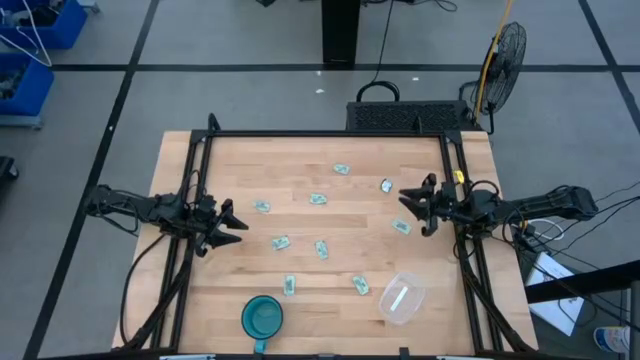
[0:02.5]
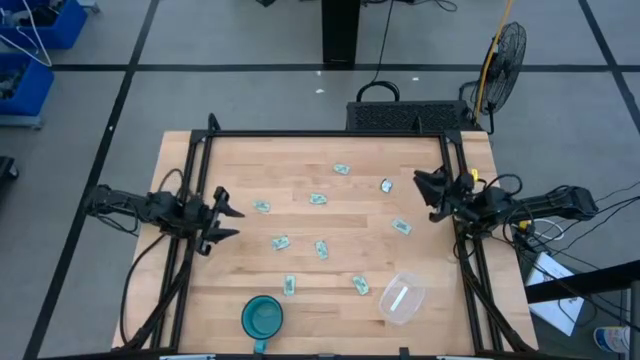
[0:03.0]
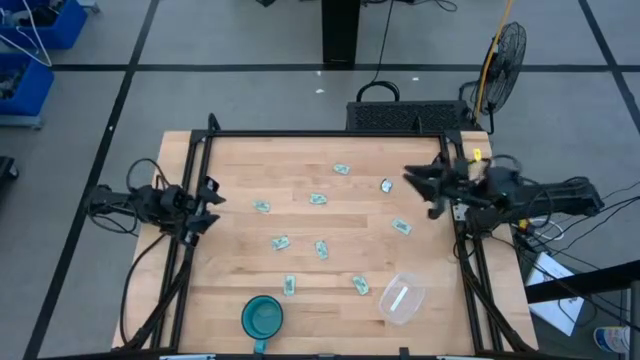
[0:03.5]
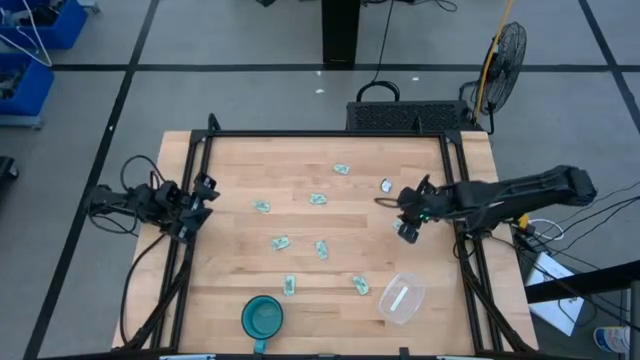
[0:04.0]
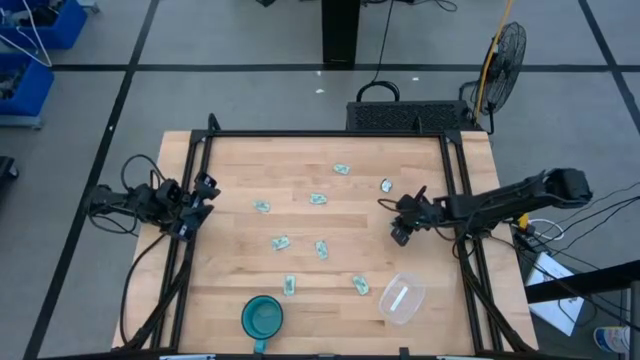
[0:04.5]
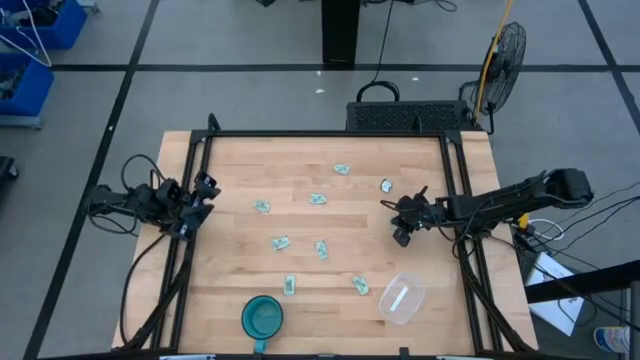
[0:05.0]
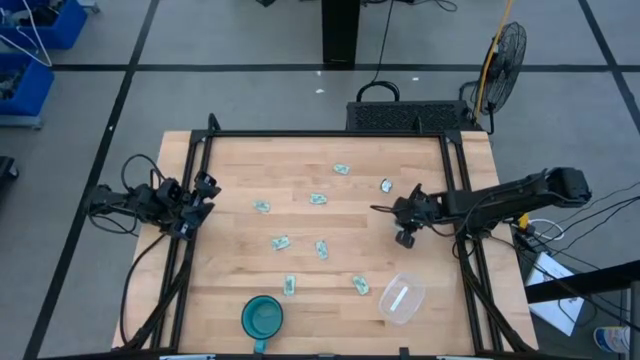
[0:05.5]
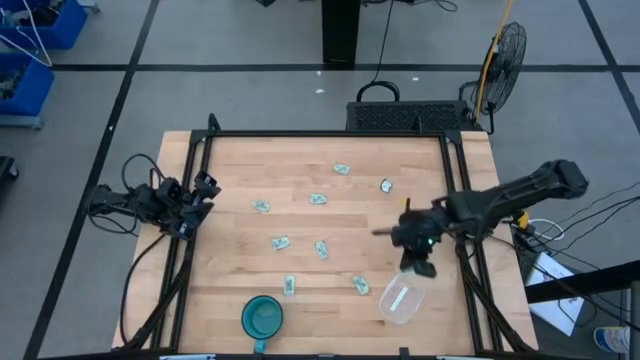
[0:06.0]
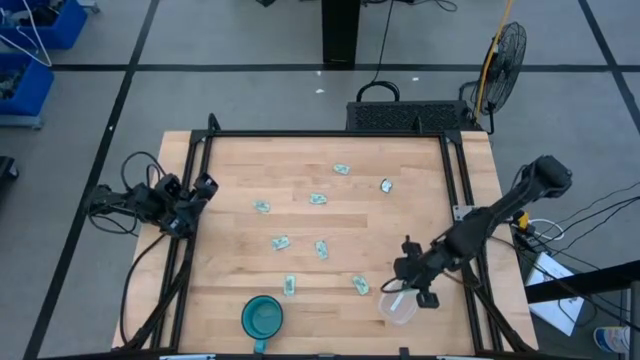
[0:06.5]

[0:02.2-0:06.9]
Task: Pick and place Stevia / Truvia into bins
Put the light green stevia packet into the transparent bin

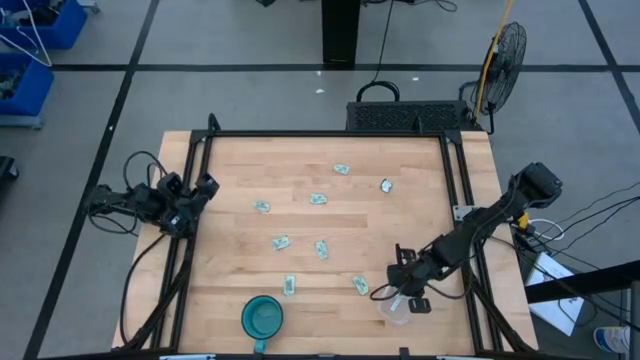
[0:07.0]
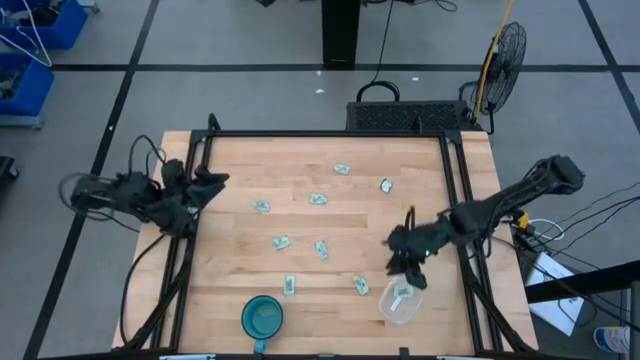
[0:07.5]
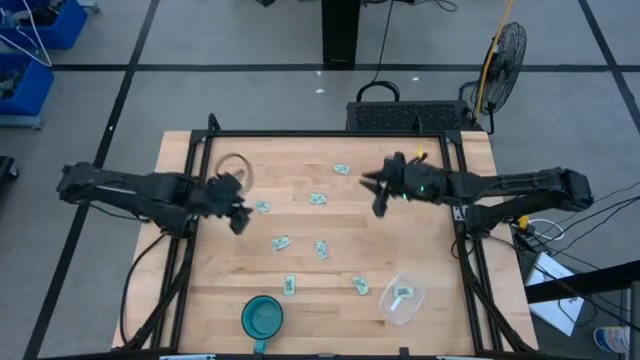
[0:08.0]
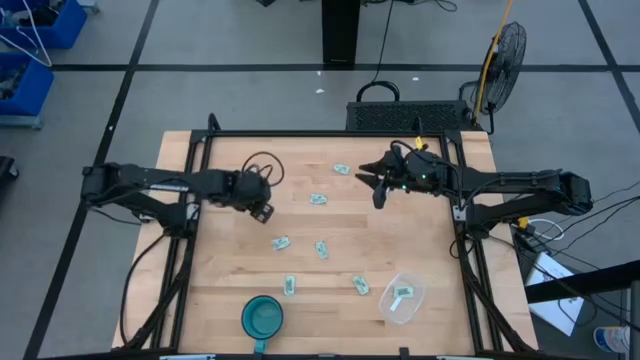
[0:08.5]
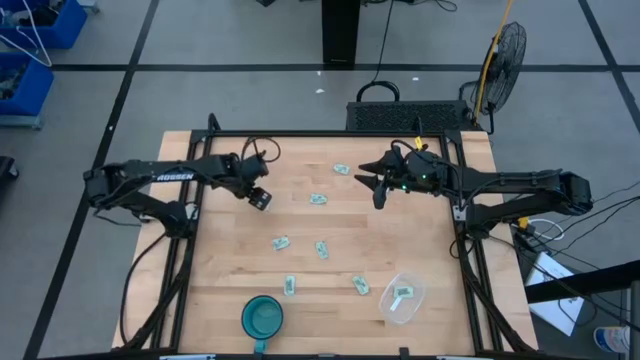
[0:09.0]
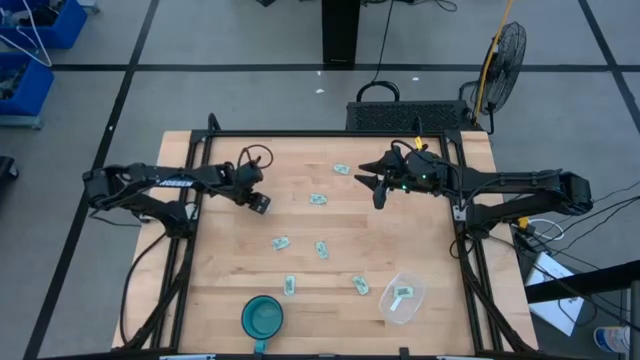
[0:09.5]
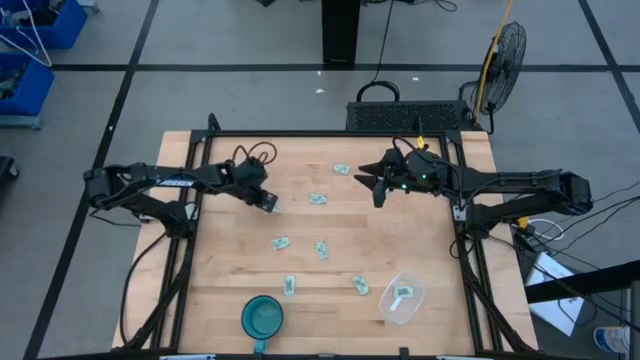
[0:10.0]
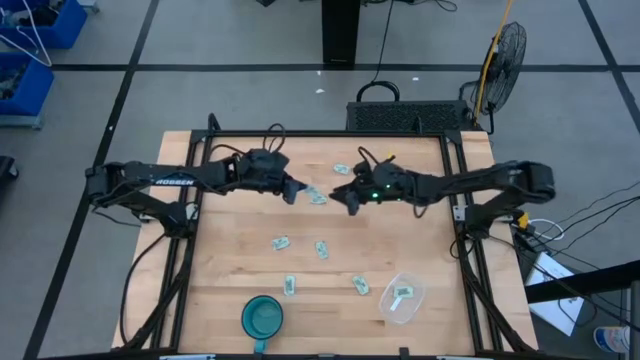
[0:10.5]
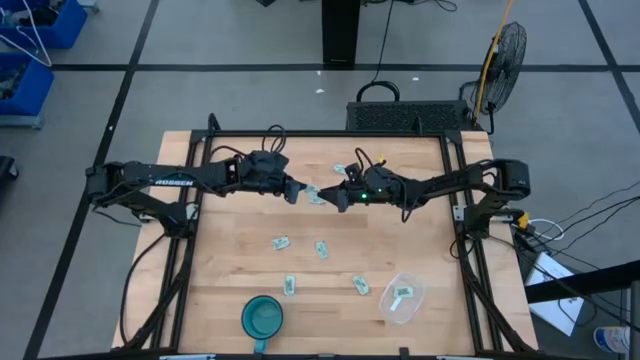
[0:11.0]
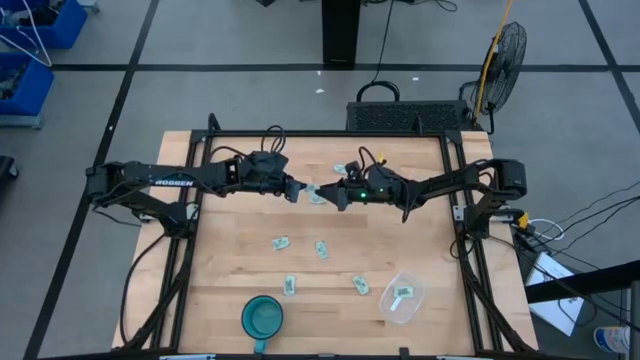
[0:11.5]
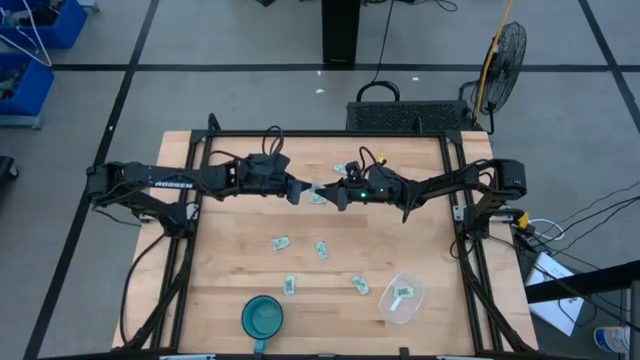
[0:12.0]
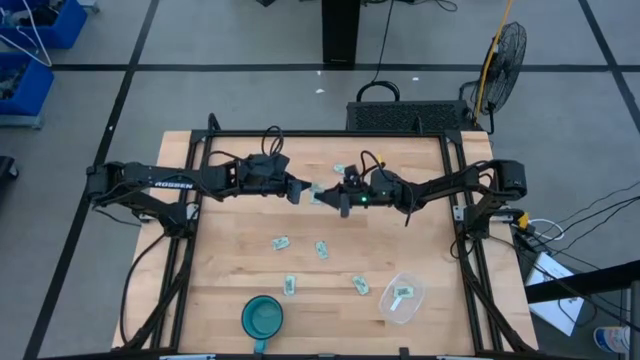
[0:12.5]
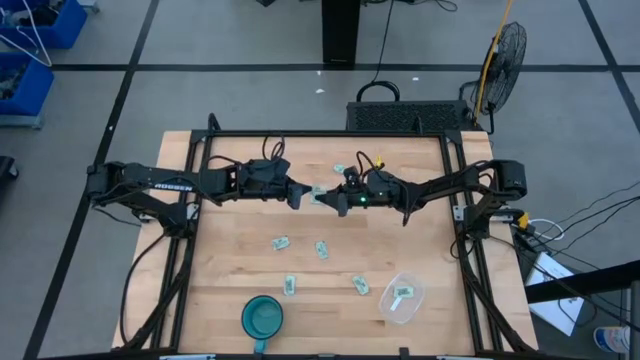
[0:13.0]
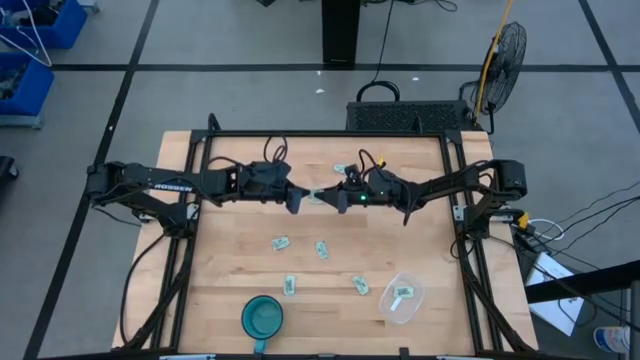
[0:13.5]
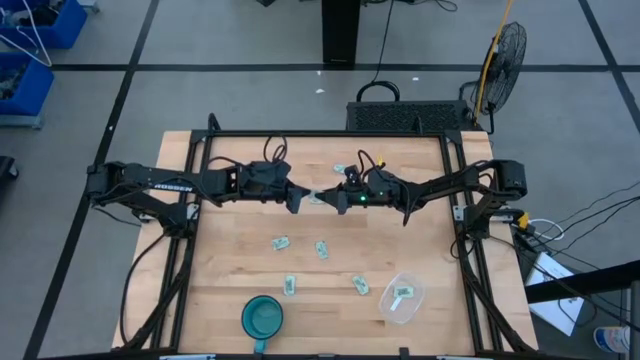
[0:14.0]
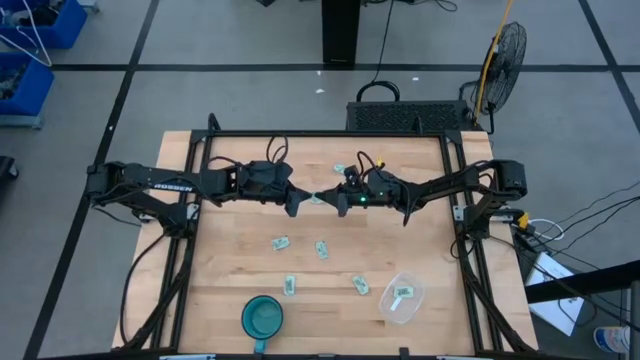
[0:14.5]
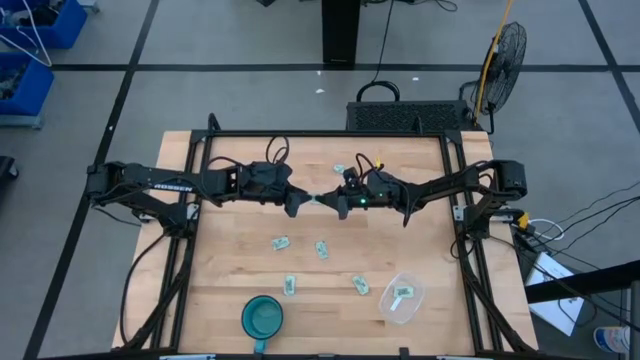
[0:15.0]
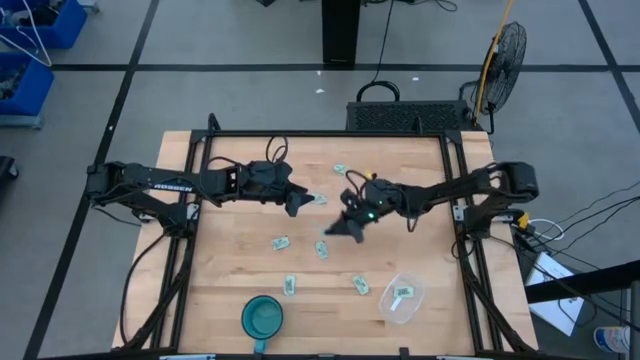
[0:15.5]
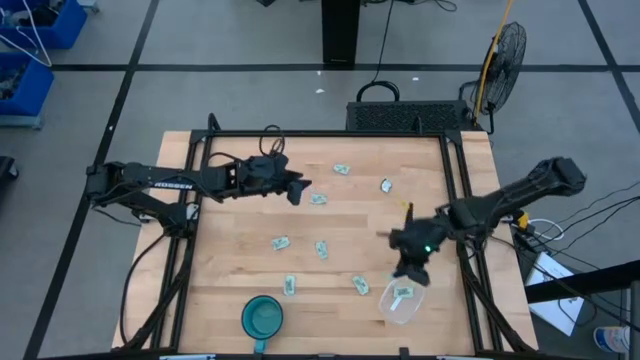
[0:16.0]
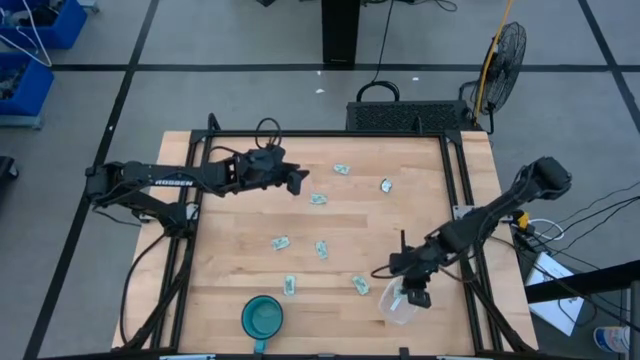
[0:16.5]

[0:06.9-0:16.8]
Put the light green stevia packet into the transparent bin

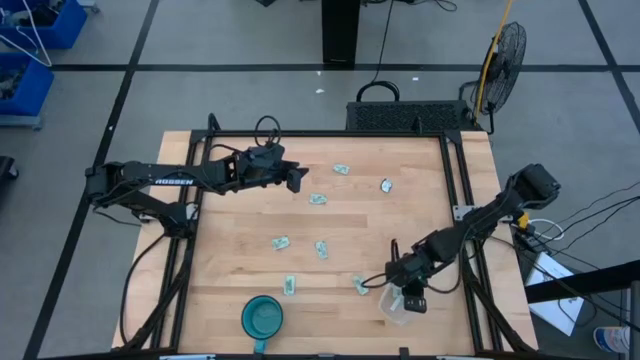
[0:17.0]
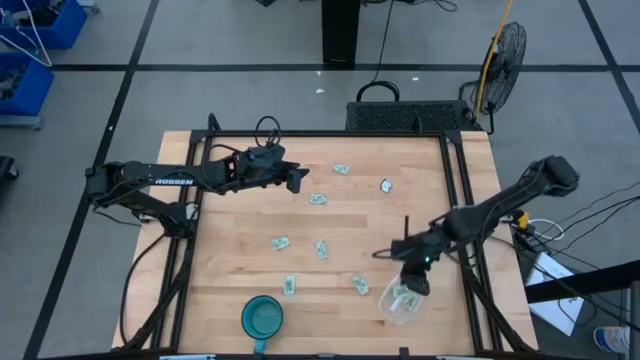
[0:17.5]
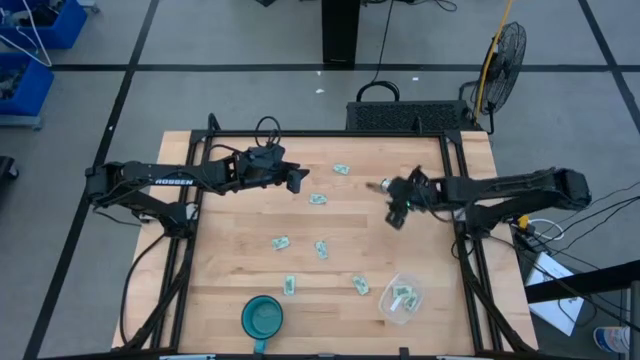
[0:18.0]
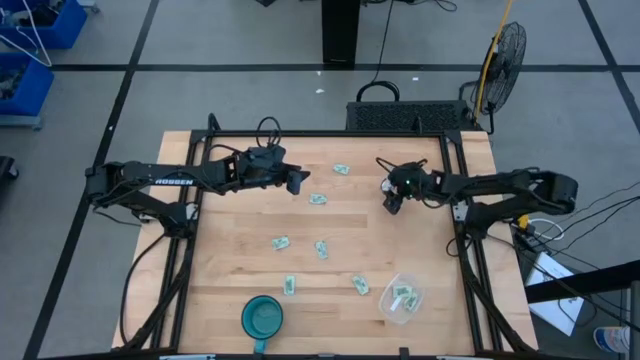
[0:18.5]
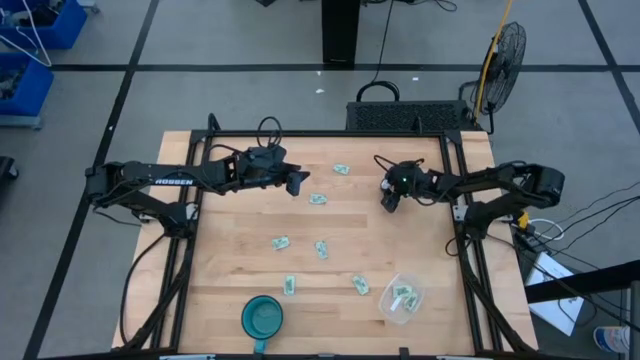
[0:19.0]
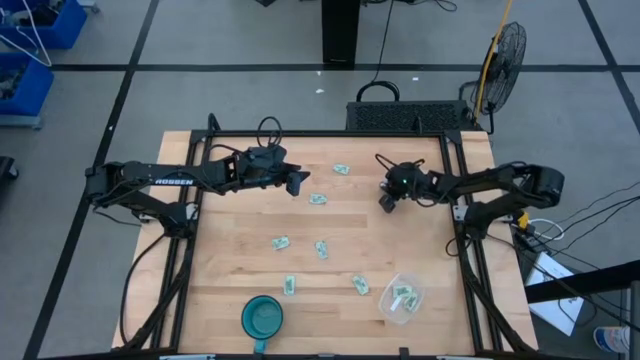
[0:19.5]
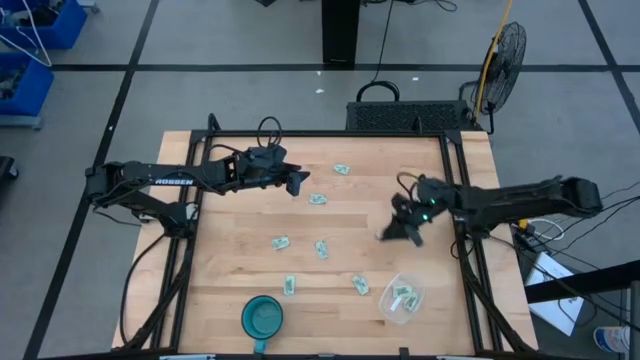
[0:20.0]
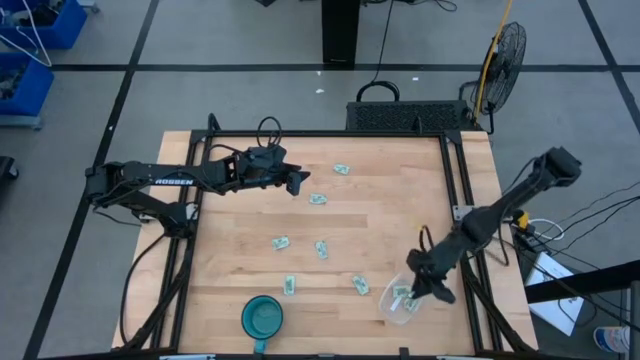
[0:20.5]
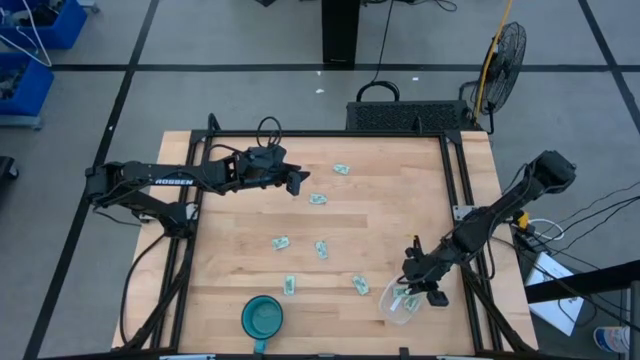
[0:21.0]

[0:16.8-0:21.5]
Put the green stevia packet into the transparent bin

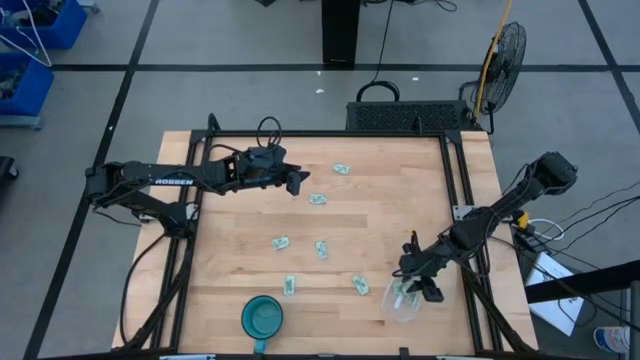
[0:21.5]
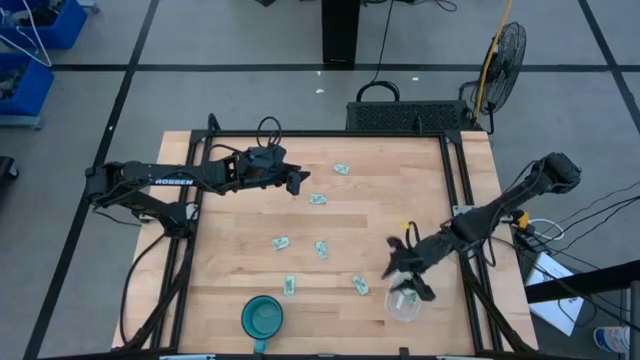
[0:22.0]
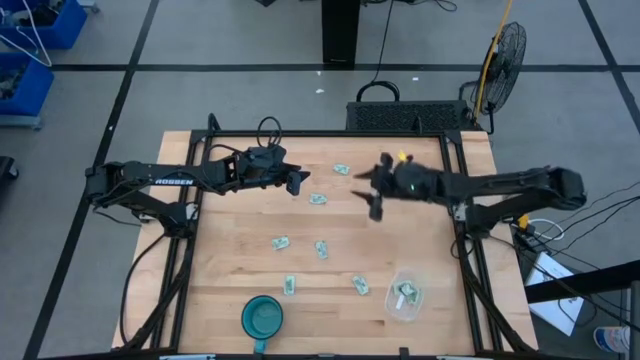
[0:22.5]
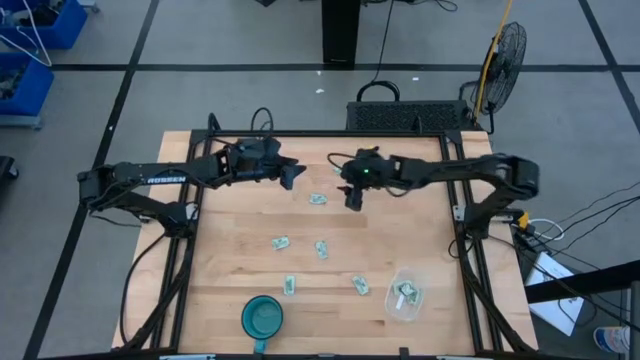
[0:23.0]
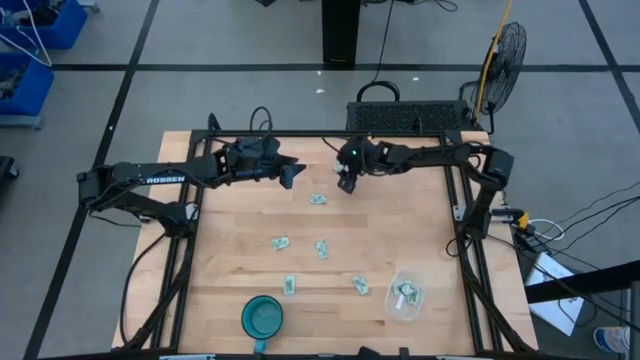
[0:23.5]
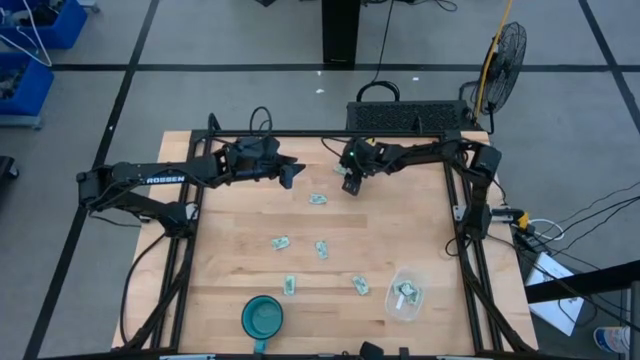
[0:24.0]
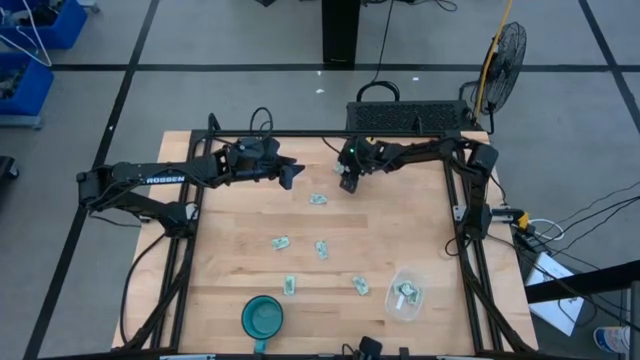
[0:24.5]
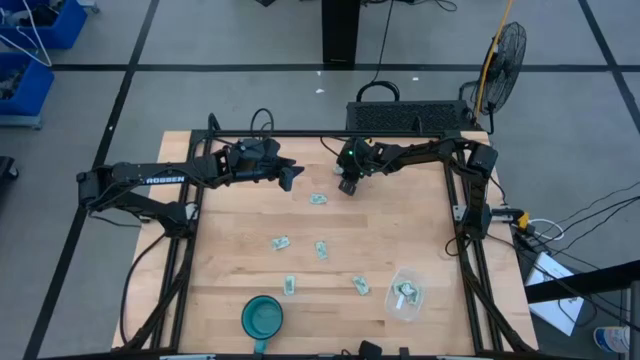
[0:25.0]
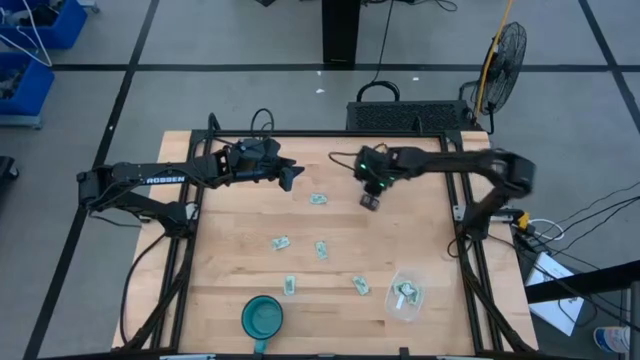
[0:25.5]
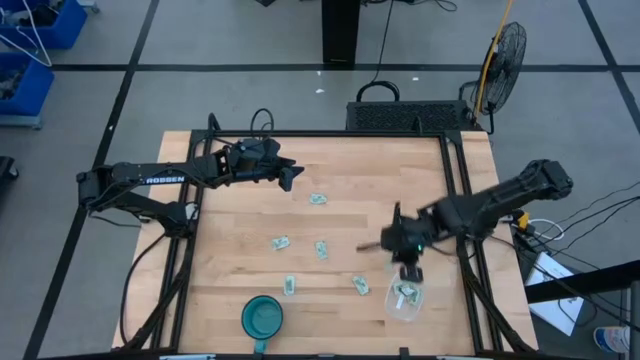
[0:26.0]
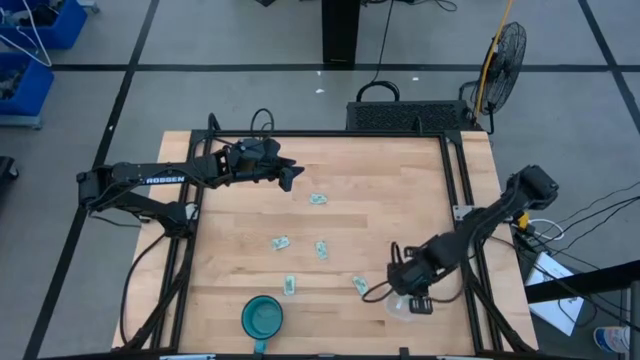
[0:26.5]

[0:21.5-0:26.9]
Put the light green stevia packet into the transparent bin
